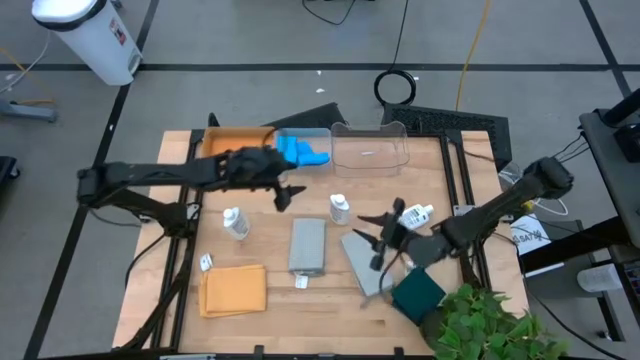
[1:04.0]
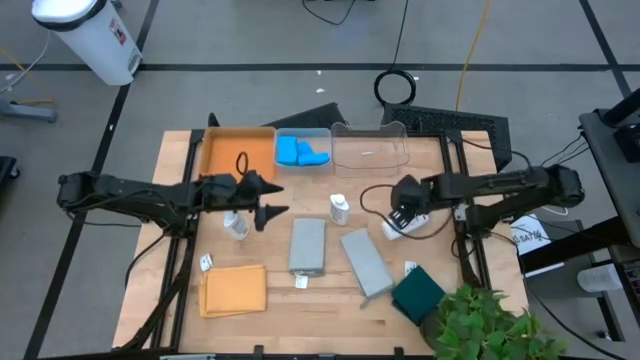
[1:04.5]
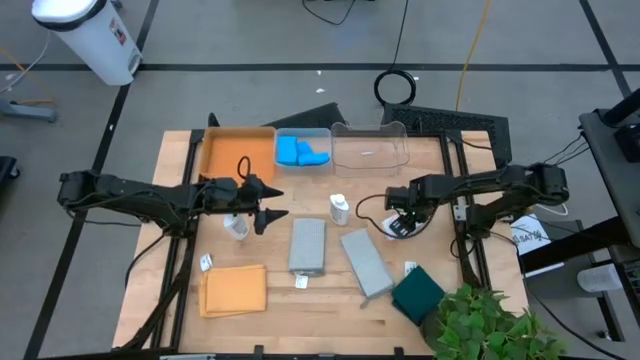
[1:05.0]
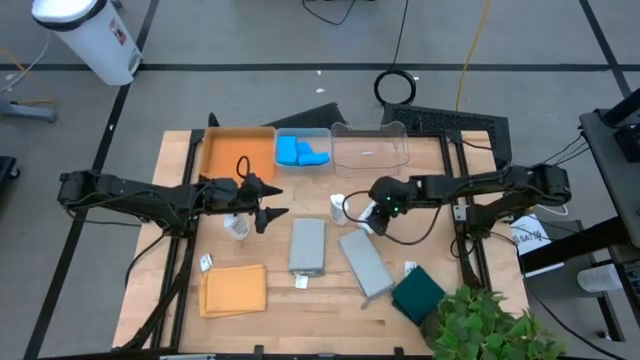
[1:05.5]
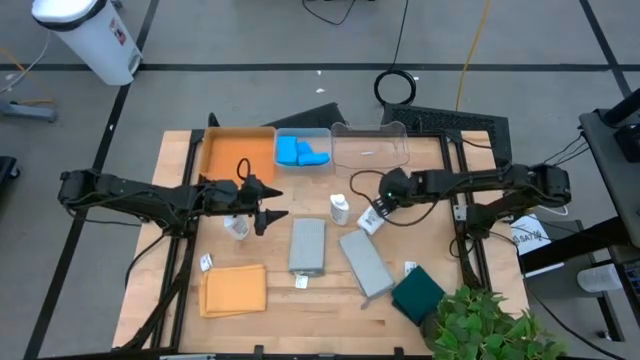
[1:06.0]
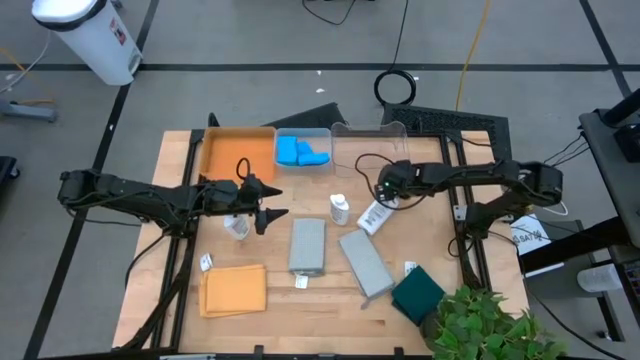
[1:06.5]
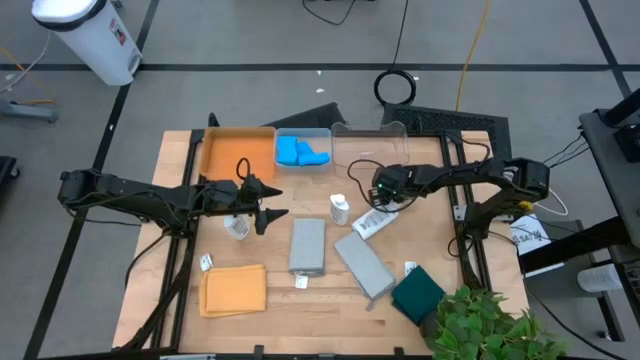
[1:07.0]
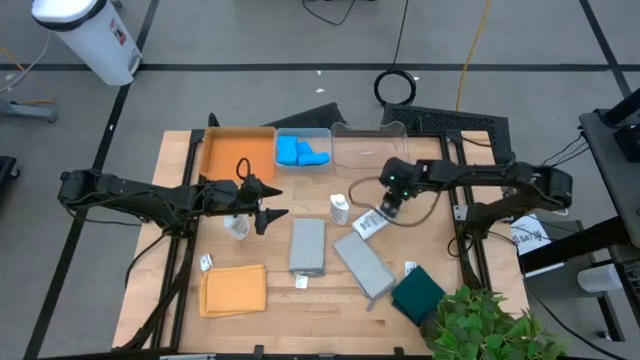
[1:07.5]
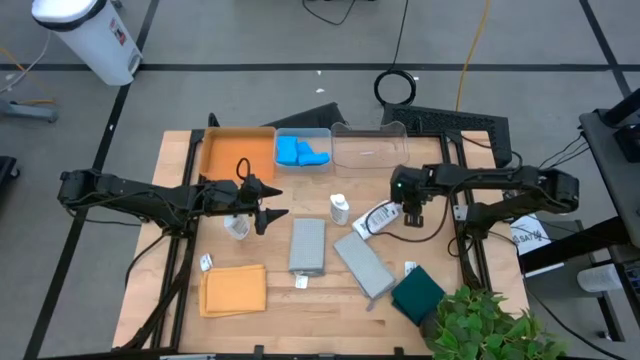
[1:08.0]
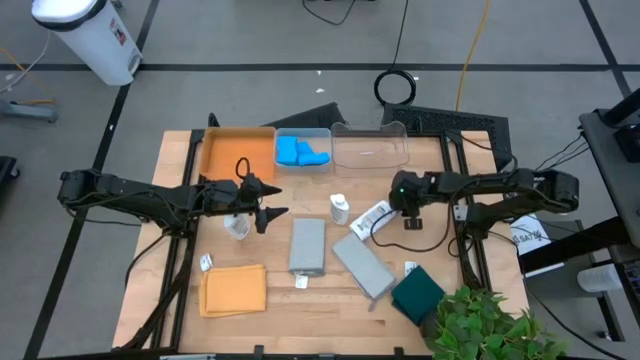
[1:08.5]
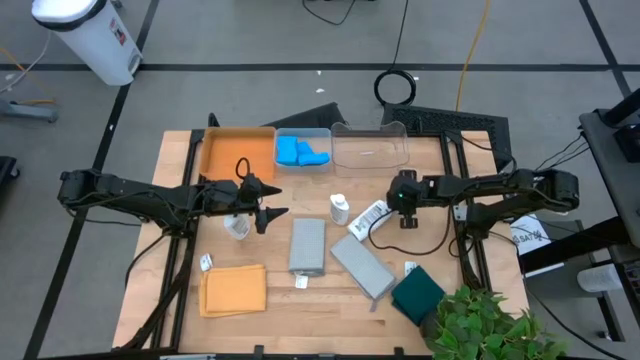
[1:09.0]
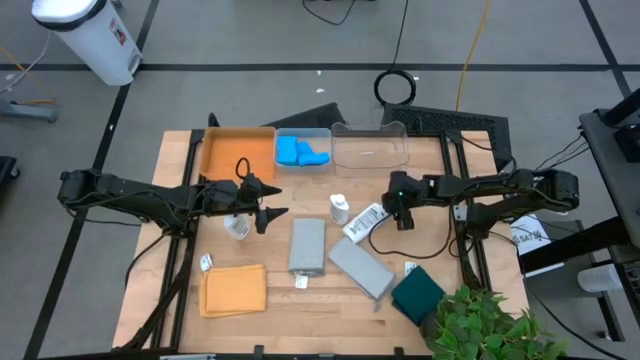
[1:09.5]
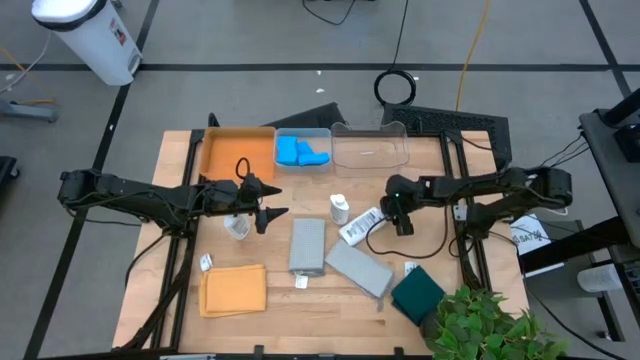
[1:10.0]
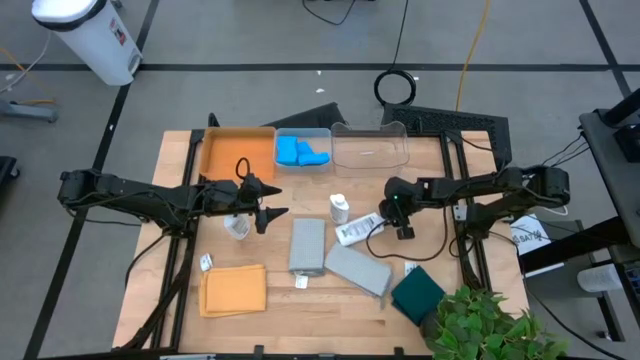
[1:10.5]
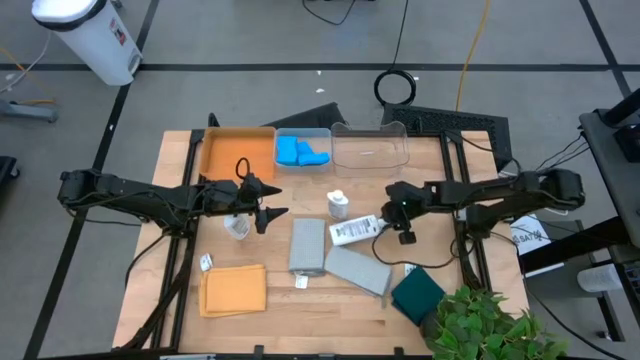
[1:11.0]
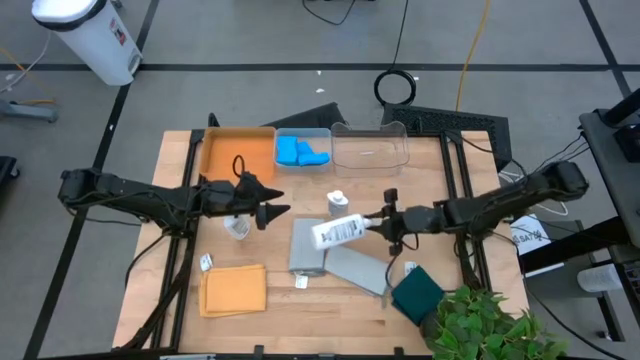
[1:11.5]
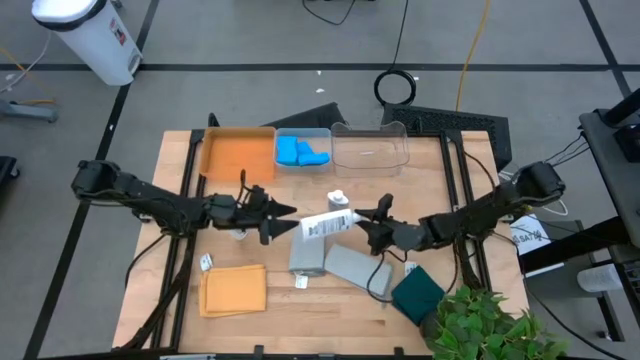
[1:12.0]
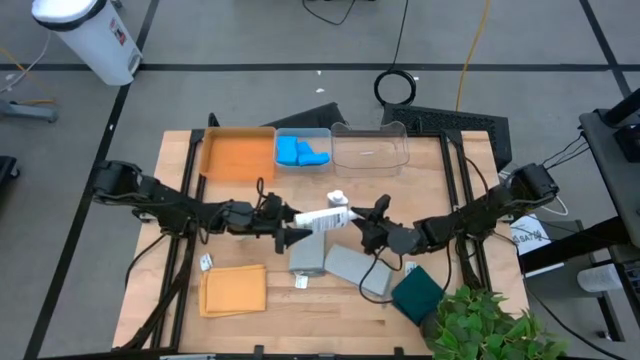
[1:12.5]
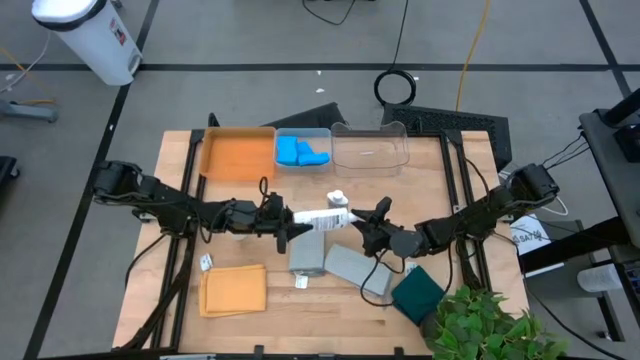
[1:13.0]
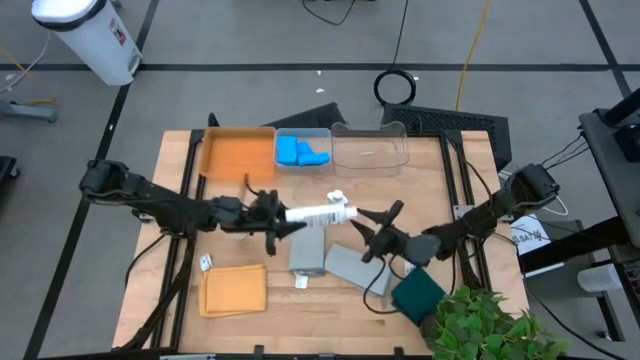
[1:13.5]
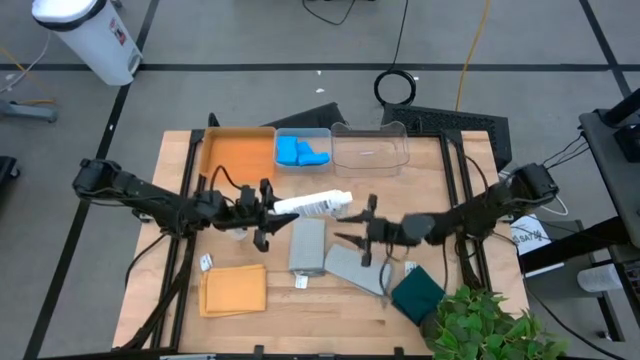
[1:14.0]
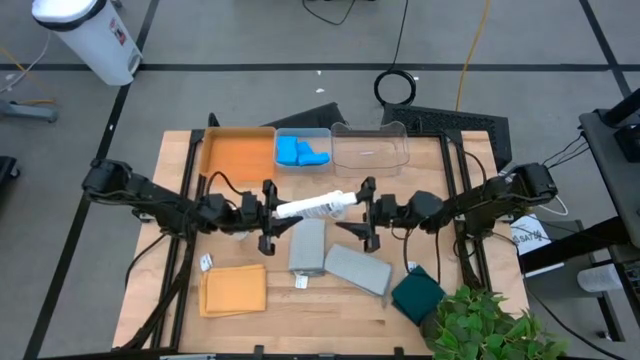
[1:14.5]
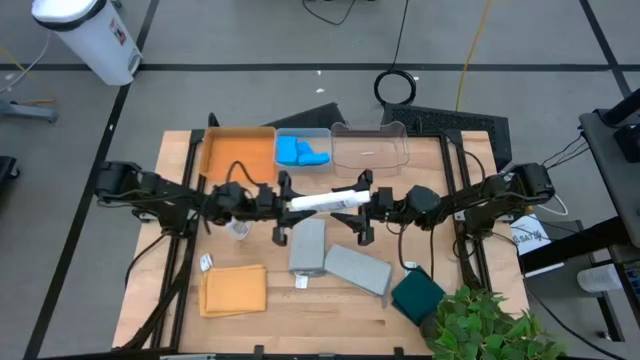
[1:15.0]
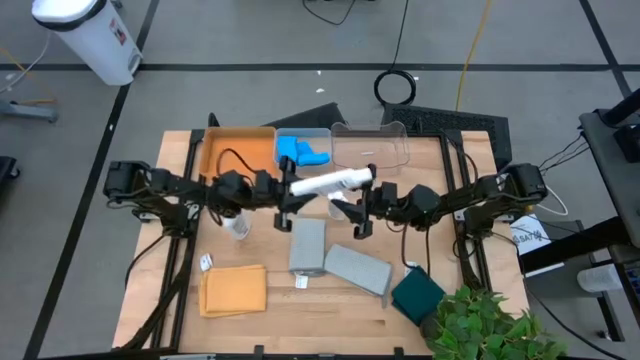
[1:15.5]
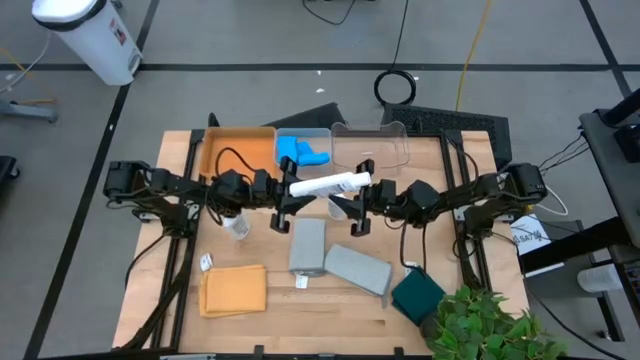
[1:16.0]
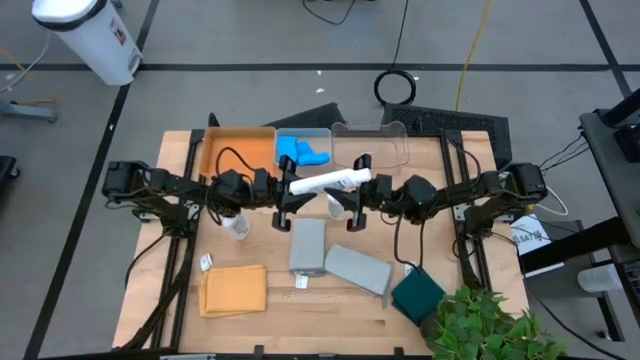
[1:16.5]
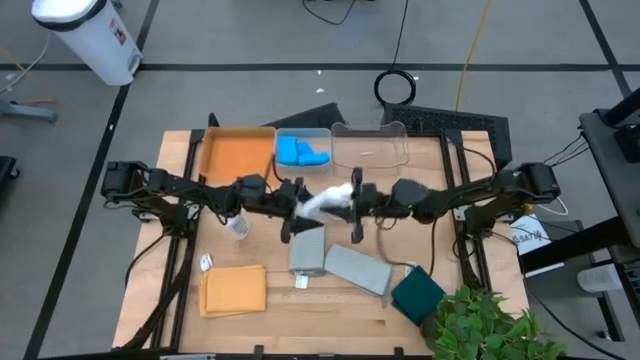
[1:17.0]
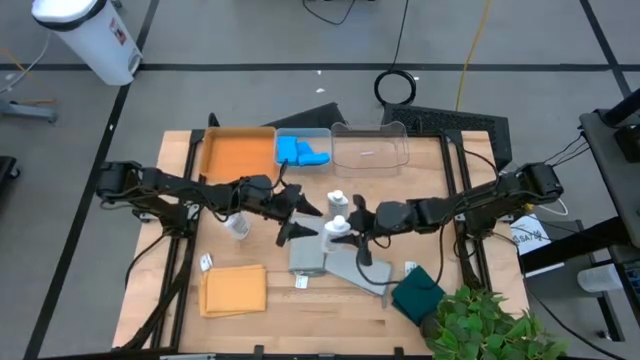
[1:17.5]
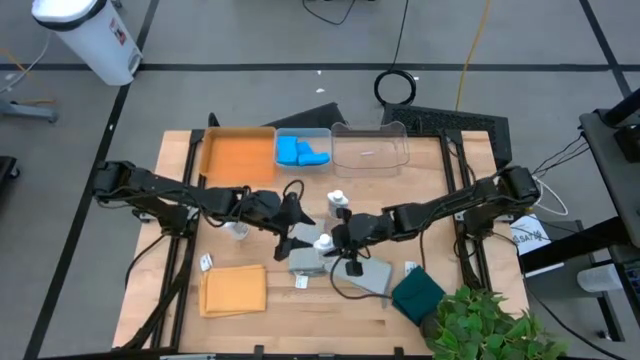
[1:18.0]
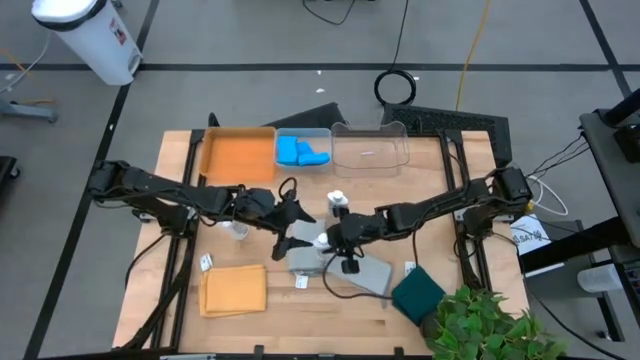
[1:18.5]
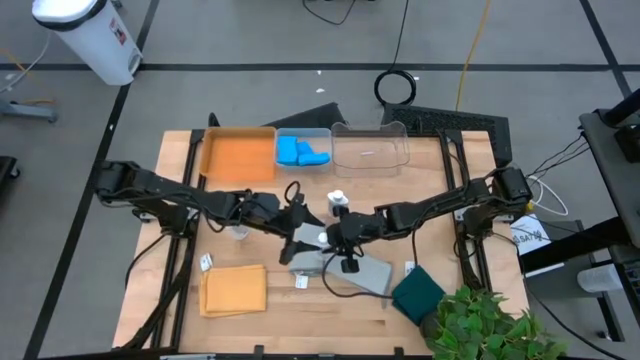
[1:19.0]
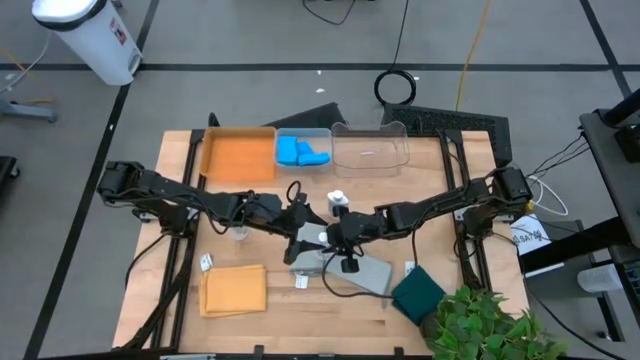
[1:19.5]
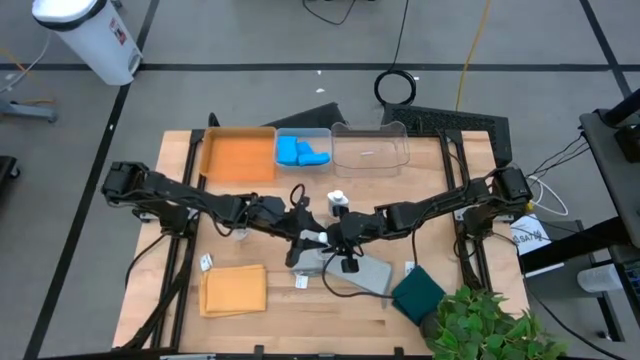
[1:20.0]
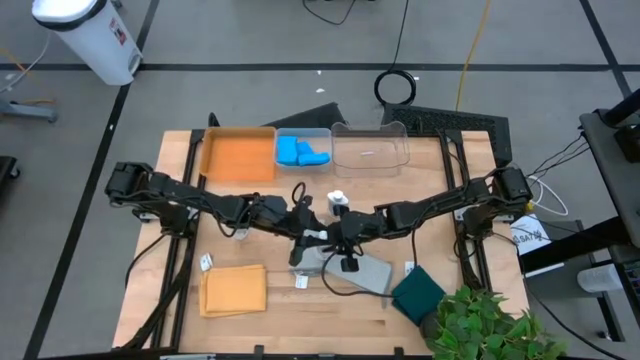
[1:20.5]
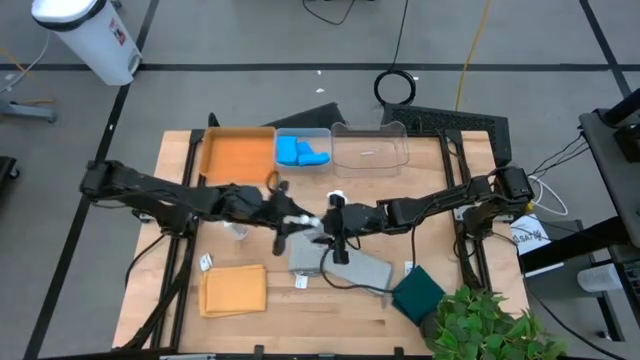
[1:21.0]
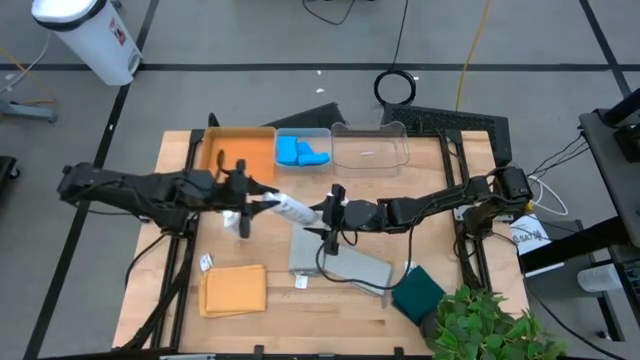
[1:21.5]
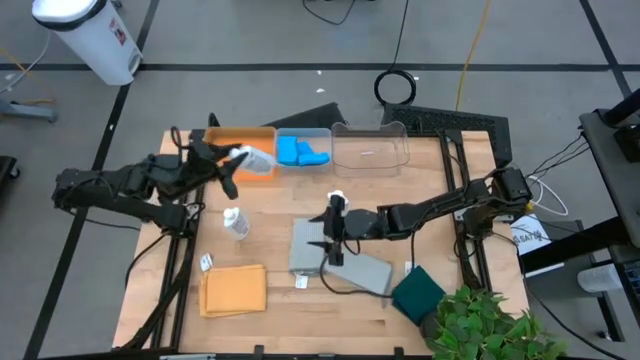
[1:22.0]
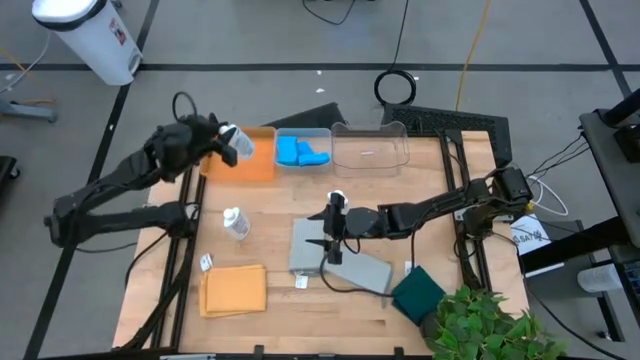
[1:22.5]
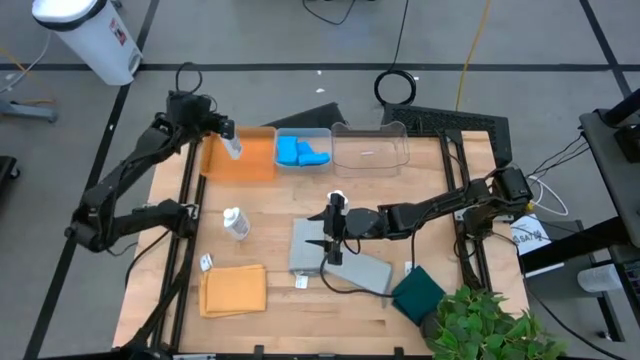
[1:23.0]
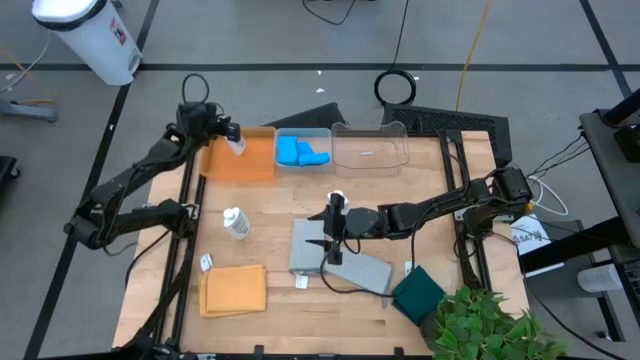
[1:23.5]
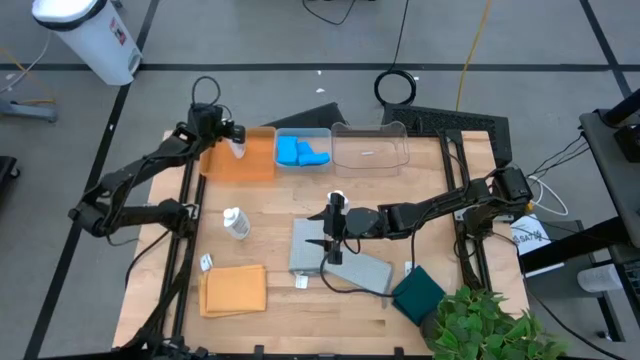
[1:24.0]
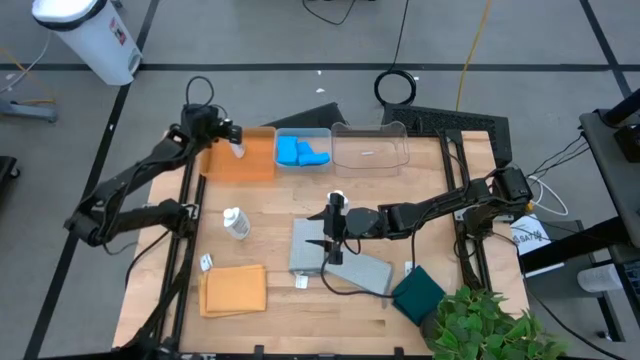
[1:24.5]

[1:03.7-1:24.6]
Task: Pick & Place Kitchen Items
Put the white plastic restorer bottle into the orange bin
